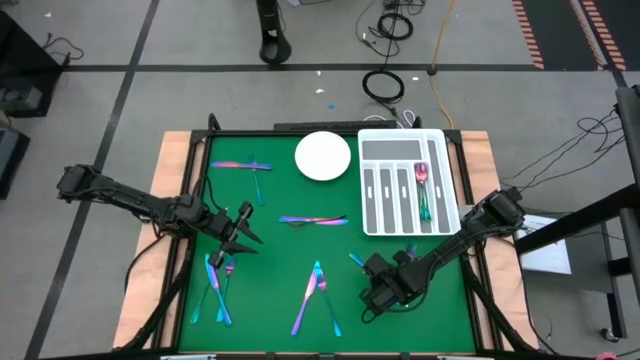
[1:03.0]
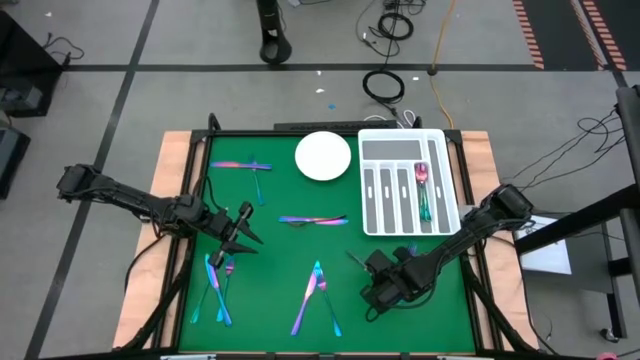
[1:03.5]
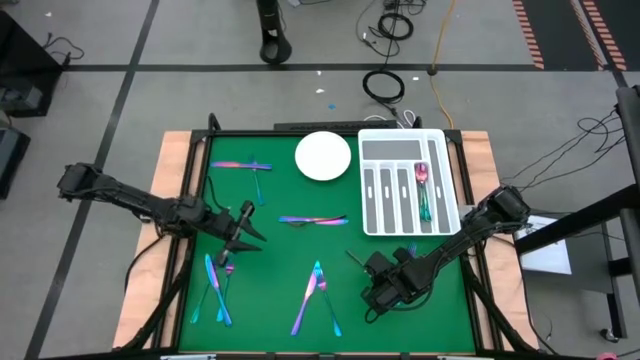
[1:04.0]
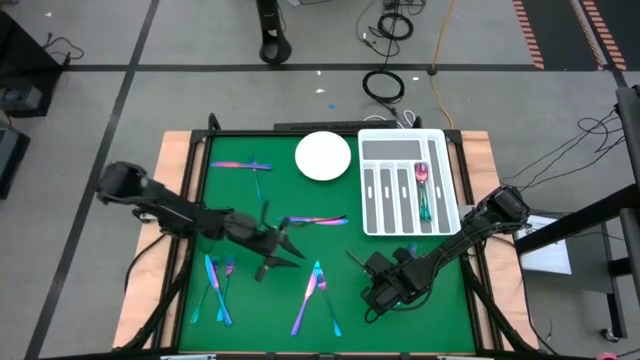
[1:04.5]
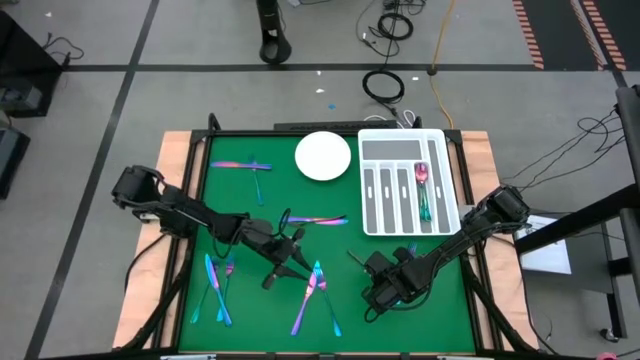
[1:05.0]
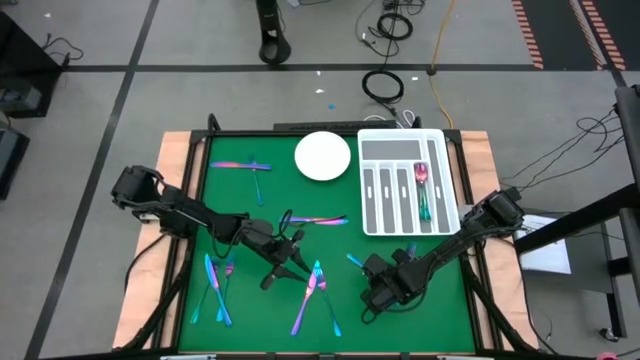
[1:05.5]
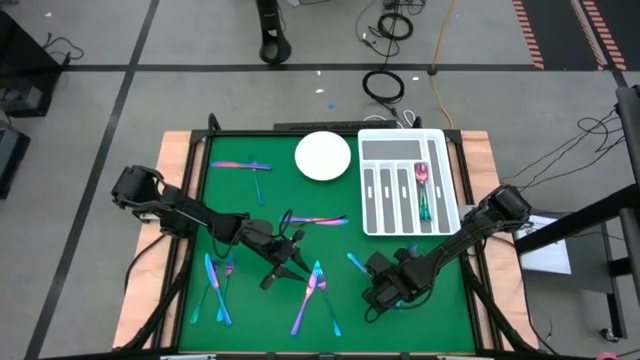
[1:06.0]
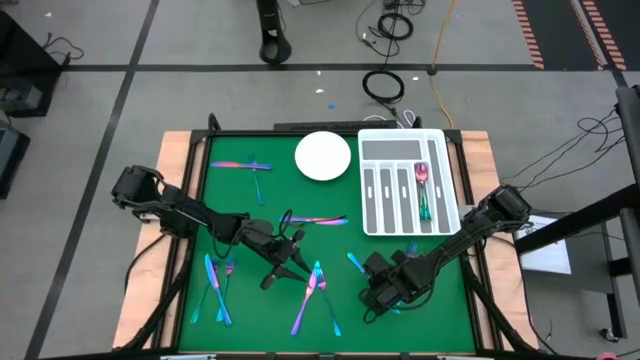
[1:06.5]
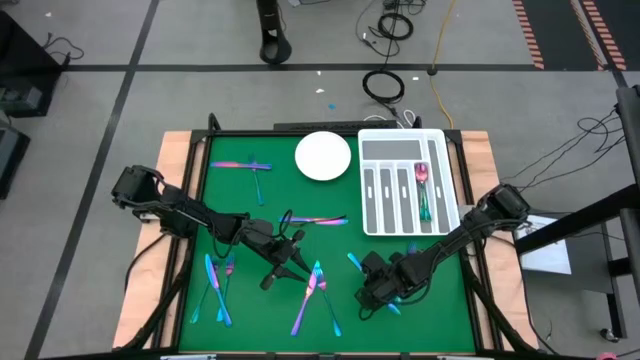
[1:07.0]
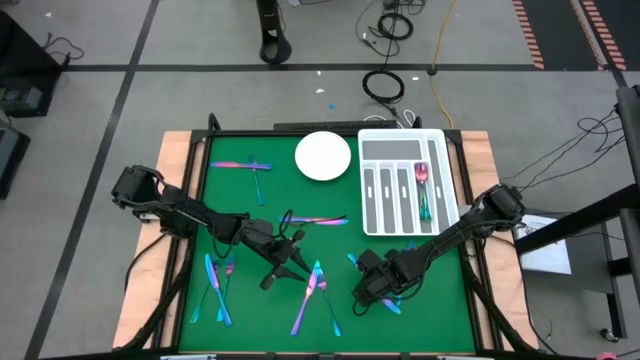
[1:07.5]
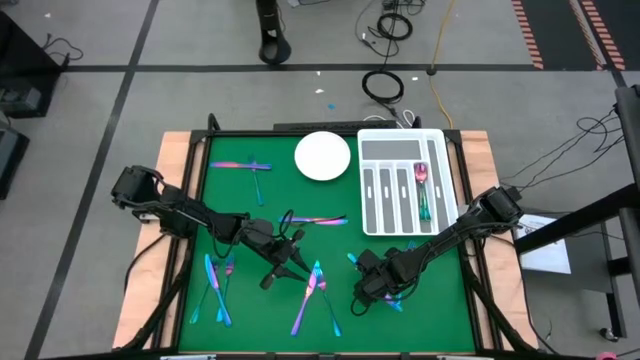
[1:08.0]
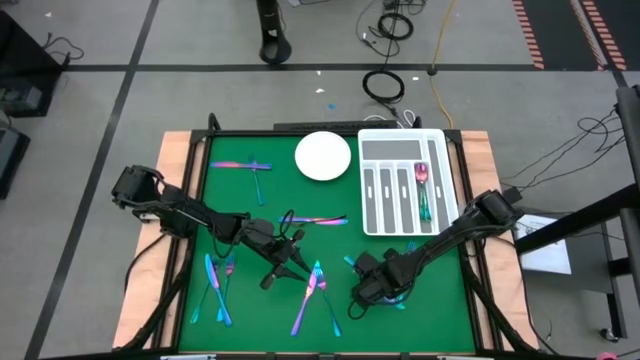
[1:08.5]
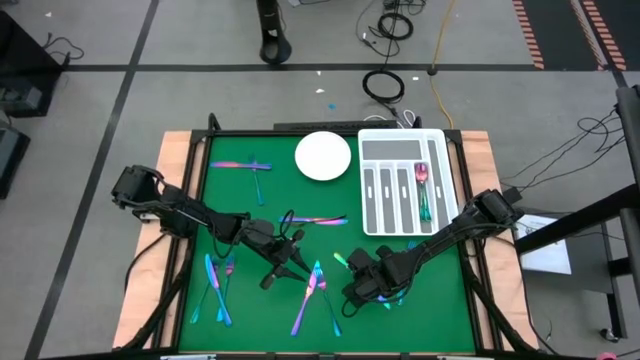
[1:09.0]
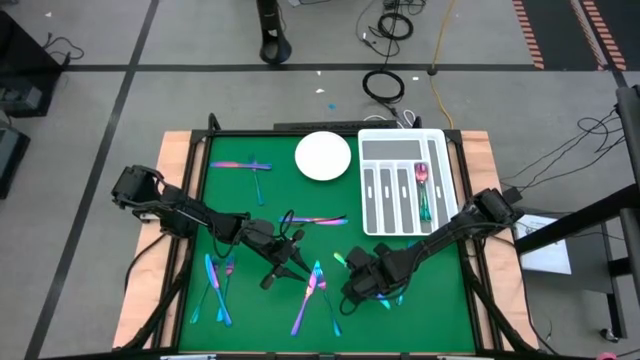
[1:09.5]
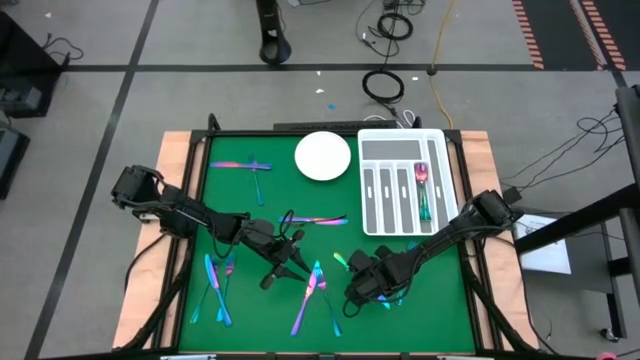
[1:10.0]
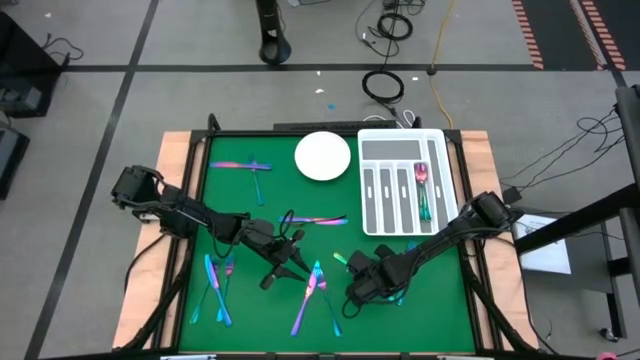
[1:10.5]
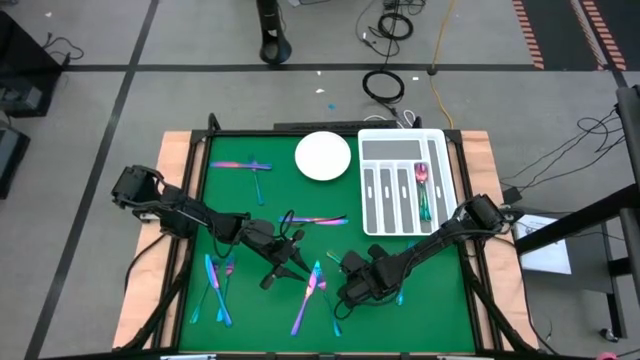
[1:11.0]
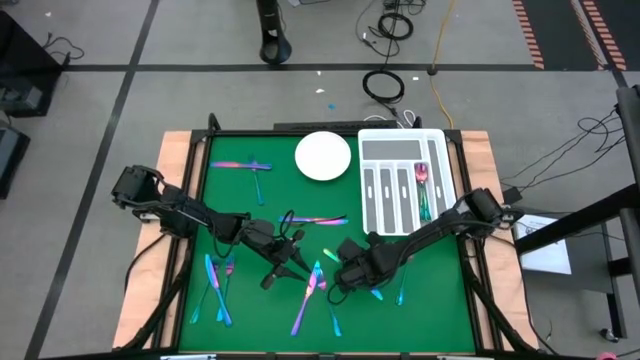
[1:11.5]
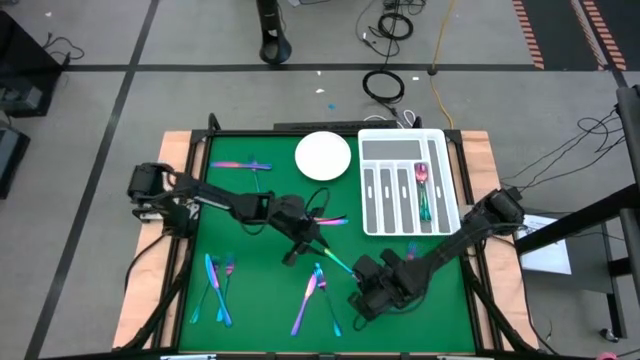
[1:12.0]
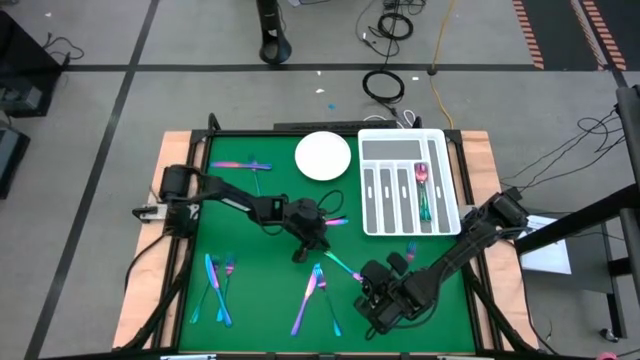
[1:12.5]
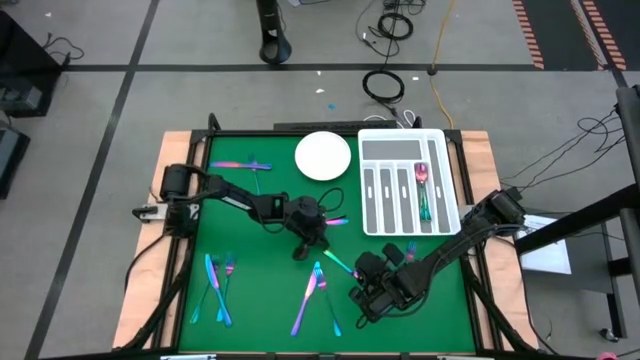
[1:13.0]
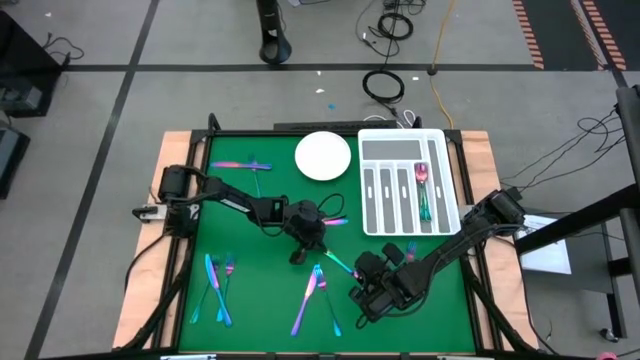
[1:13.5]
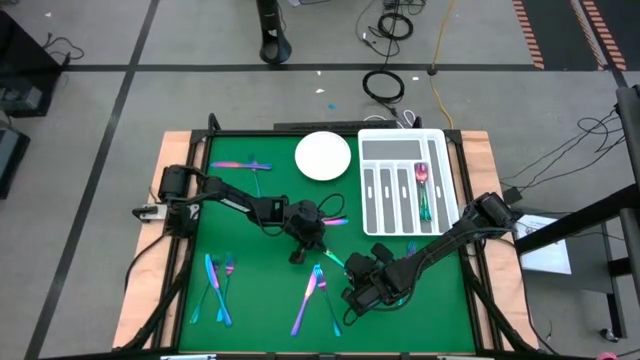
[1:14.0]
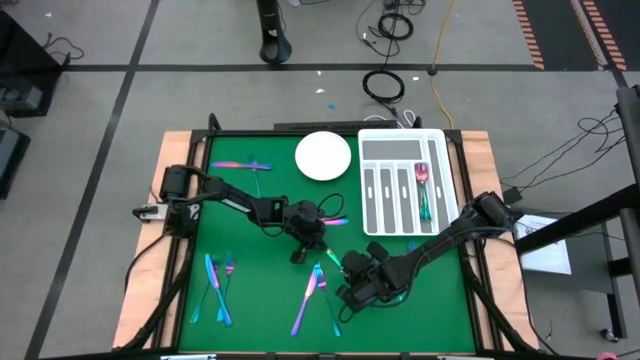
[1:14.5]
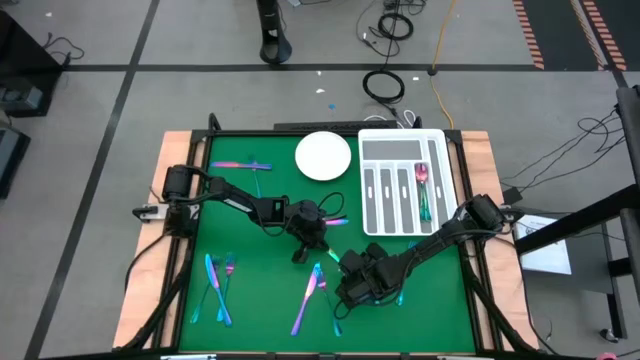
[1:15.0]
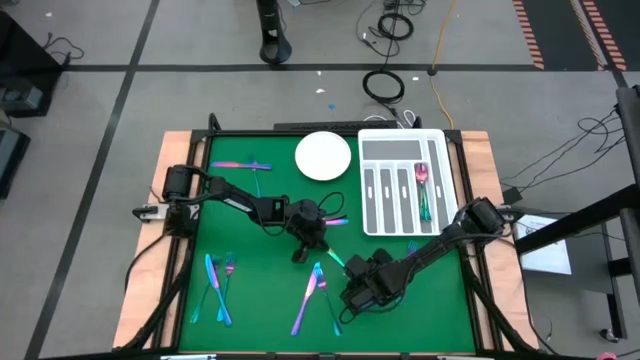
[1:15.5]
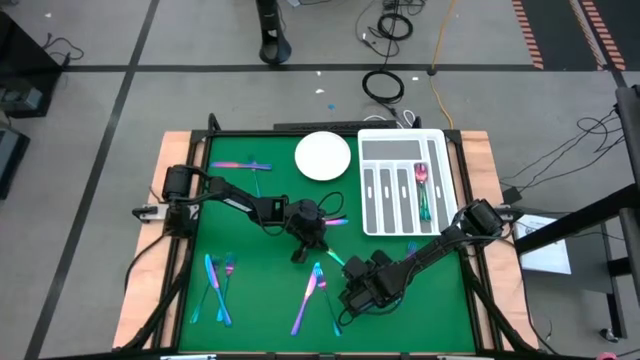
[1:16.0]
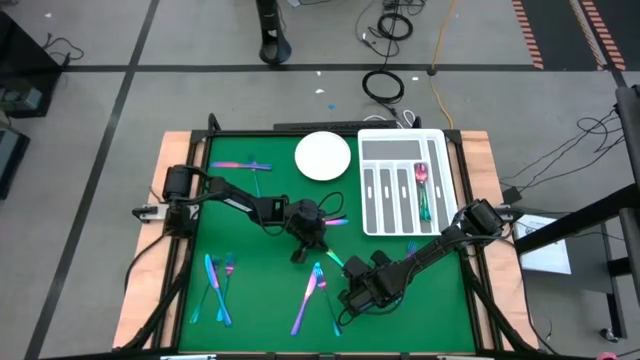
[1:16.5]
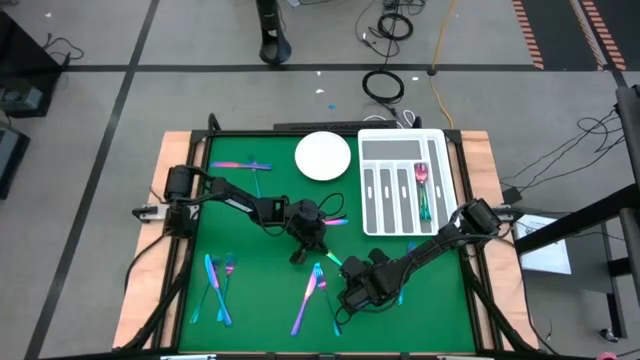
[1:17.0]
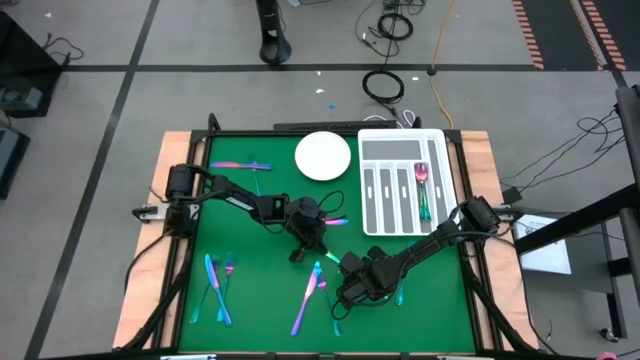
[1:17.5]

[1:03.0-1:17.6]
Task: Sort silverware
Put the iridescent knife into the white silverware tray

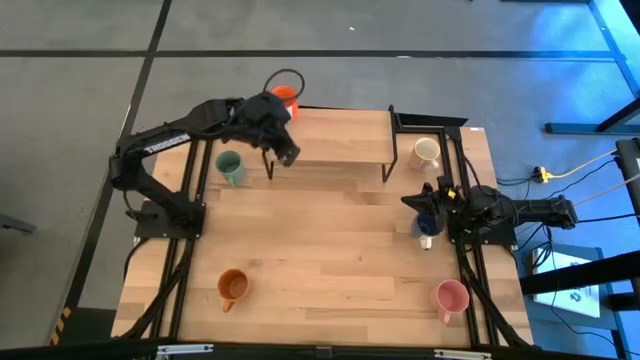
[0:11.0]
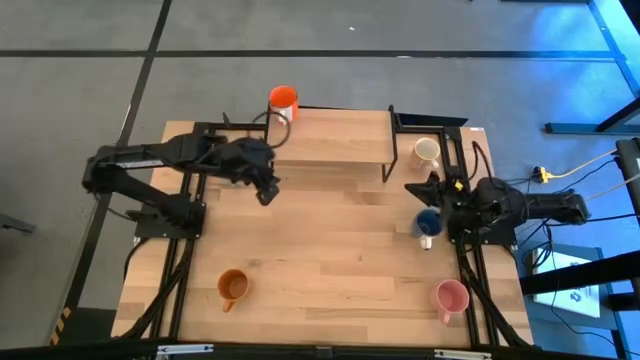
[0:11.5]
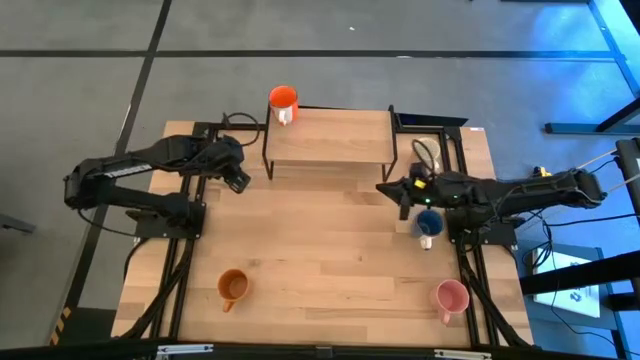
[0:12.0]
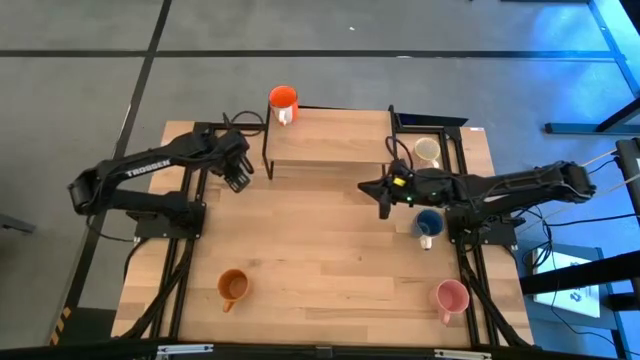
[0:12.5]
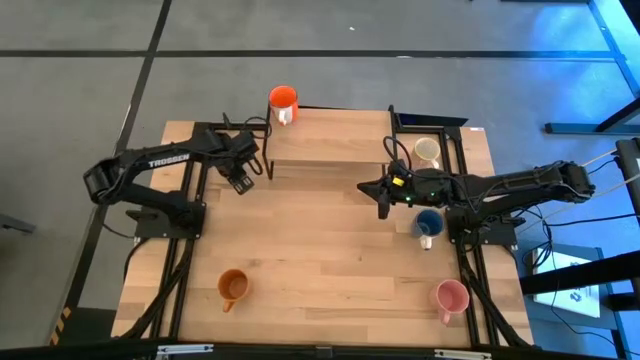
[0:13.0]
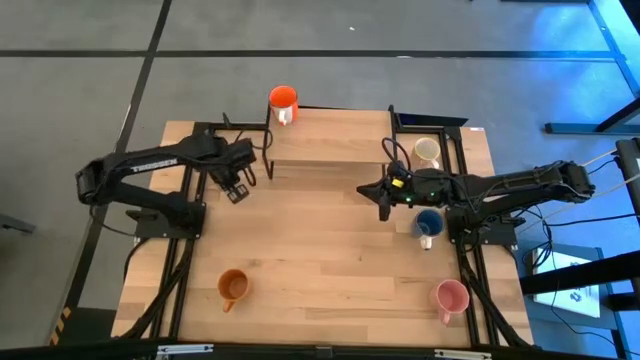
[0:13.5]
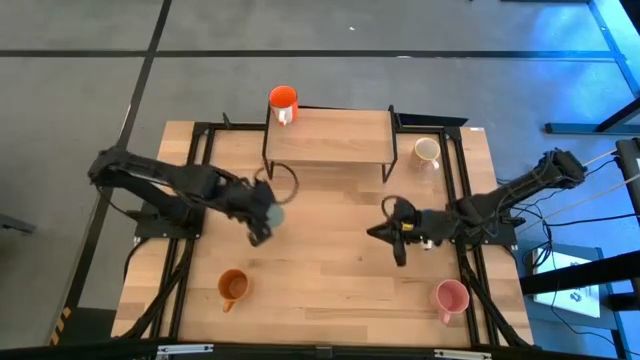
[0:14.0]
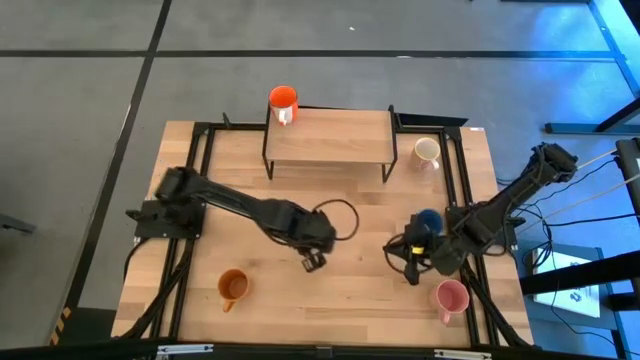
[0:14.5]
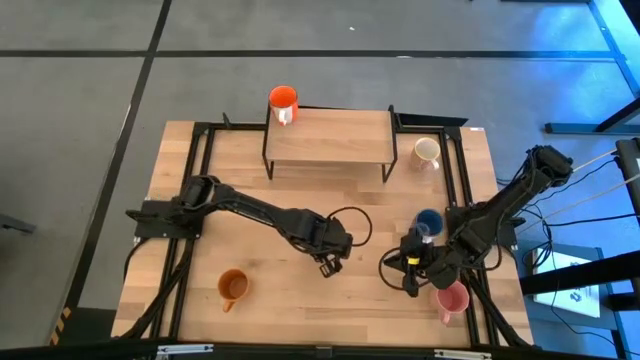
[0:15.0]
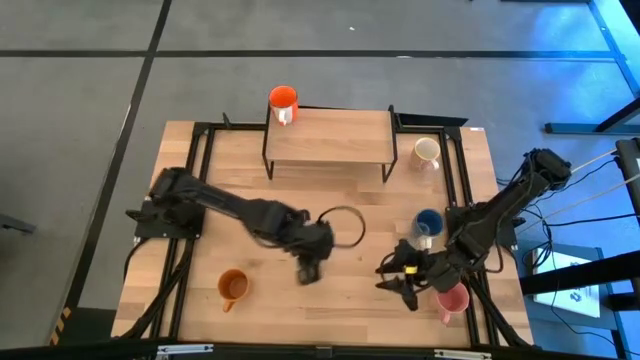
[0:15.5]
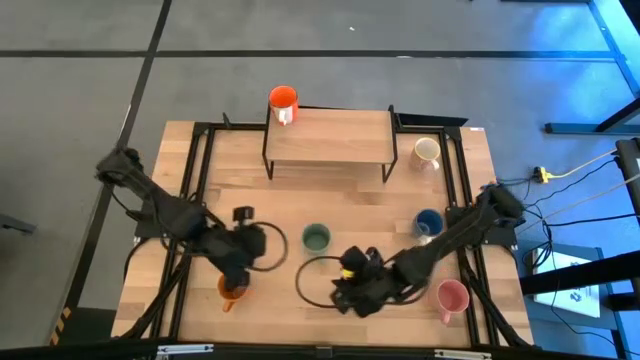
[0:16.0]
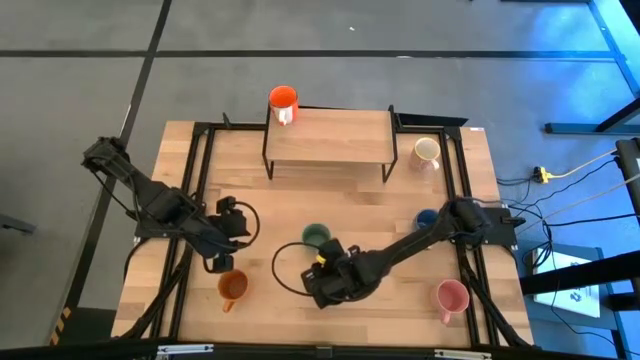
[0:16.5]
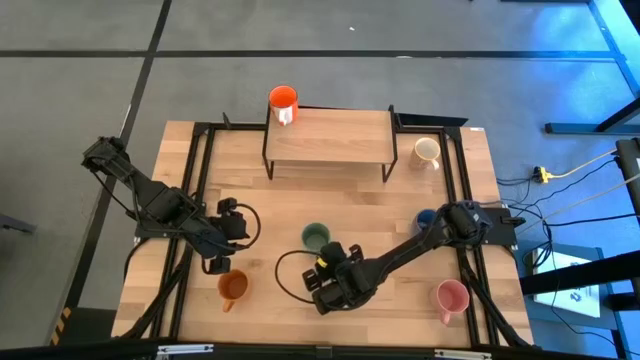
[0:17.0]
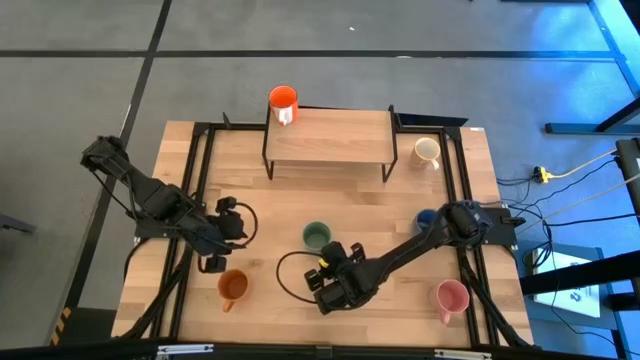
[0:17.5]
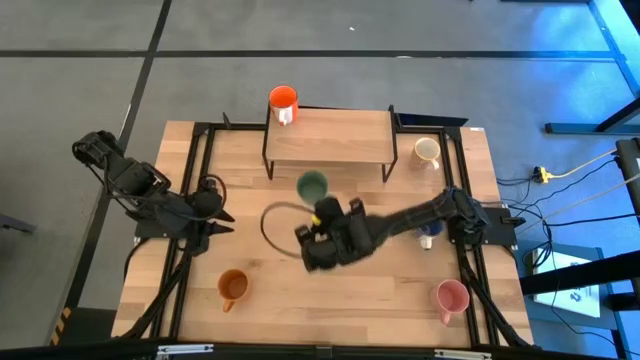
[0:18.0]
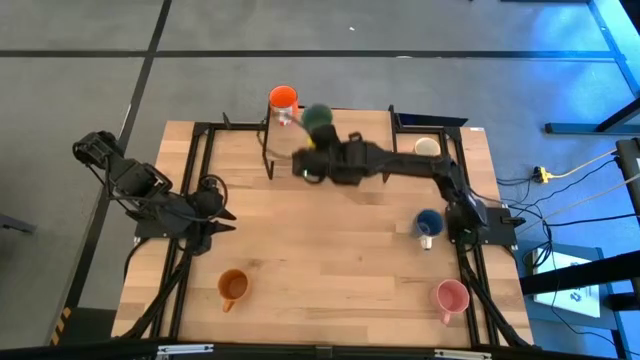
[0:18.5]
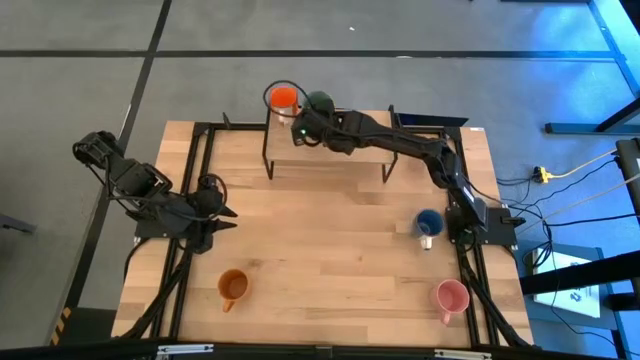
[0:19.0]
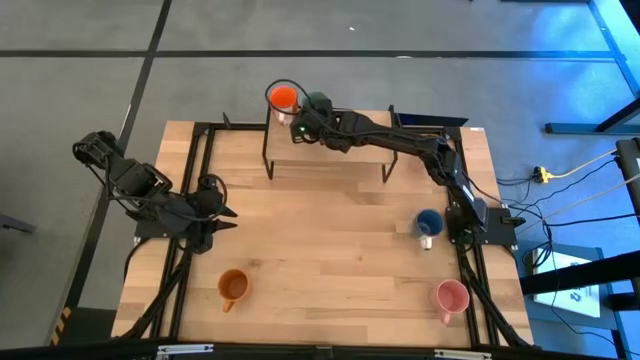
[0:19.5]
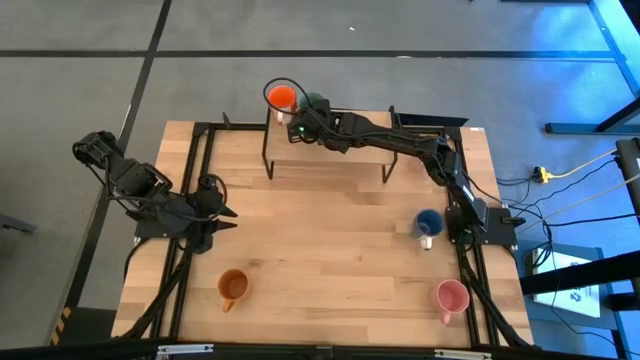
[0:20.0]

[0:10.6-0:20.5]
Task: Place coffee mugs
Put the green mug on the shelf
